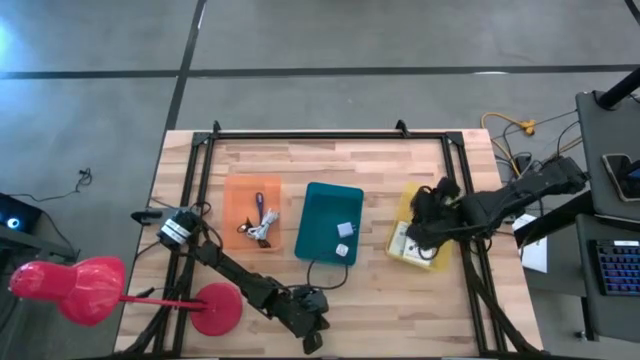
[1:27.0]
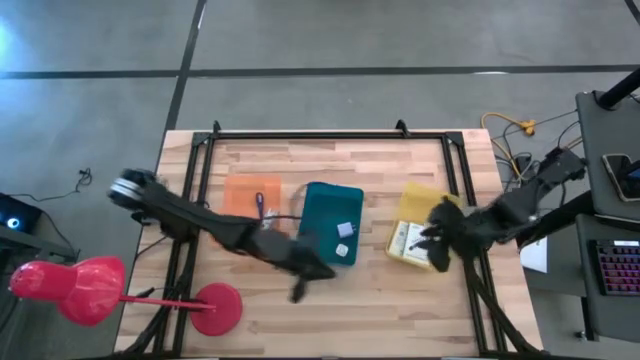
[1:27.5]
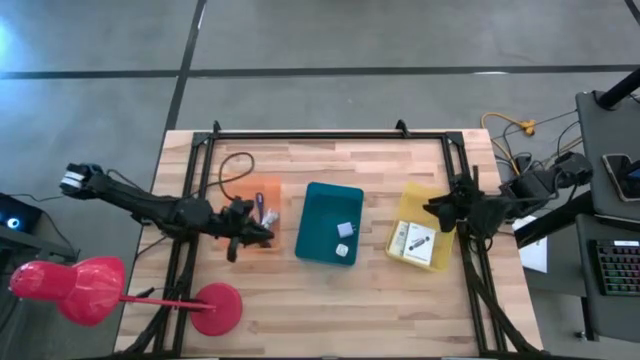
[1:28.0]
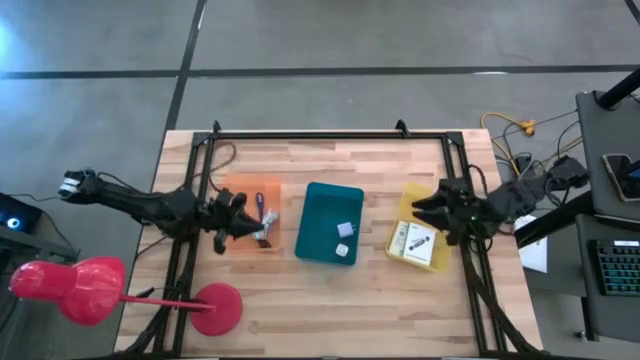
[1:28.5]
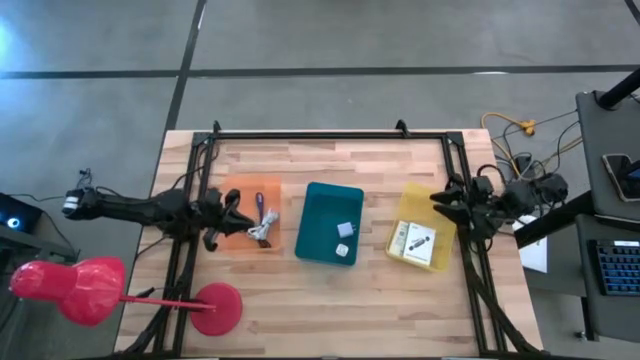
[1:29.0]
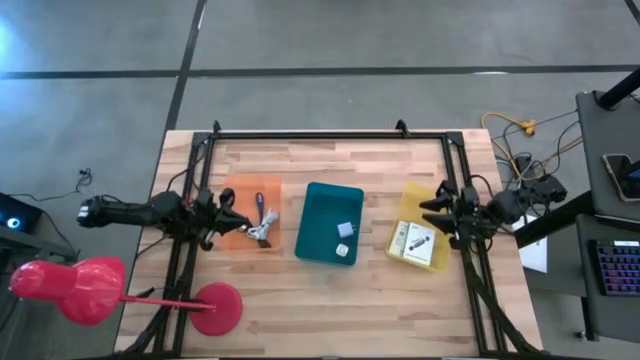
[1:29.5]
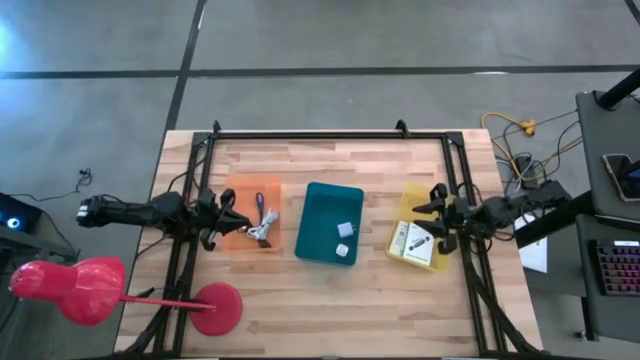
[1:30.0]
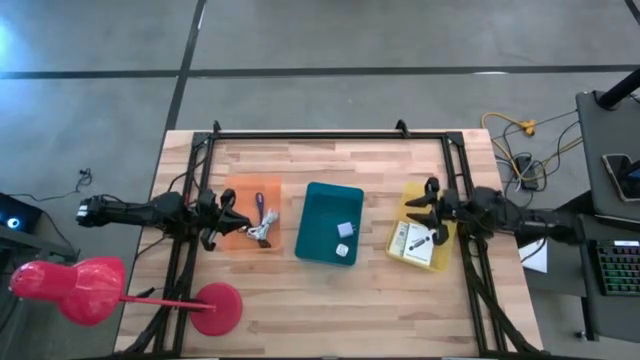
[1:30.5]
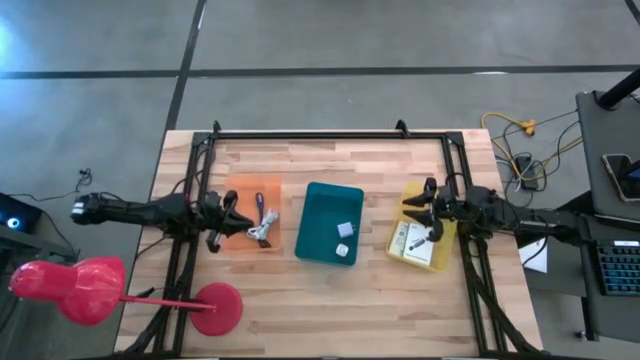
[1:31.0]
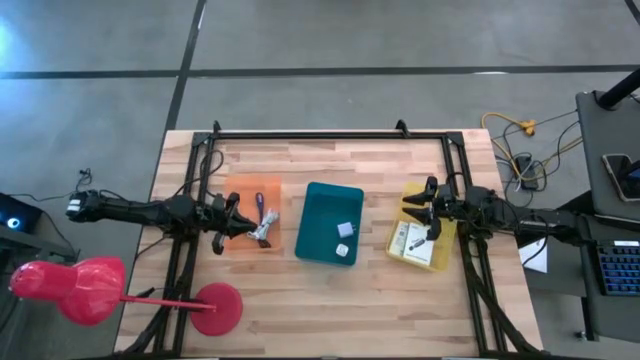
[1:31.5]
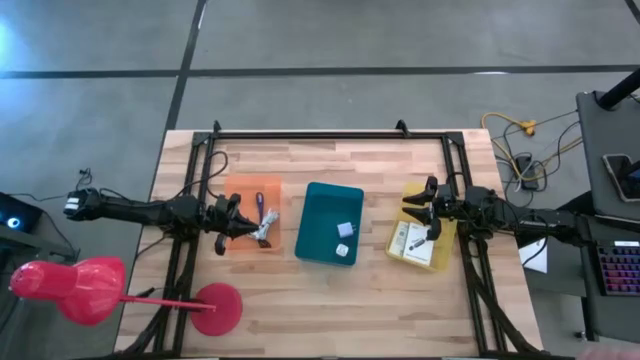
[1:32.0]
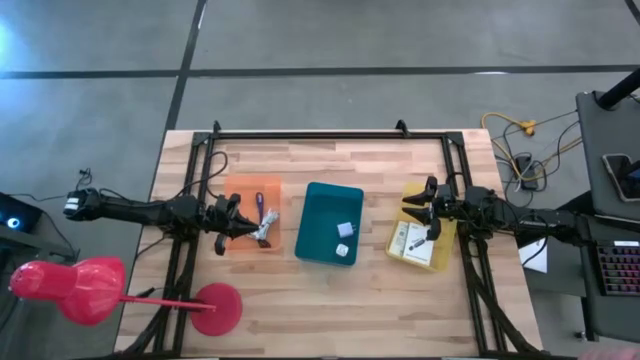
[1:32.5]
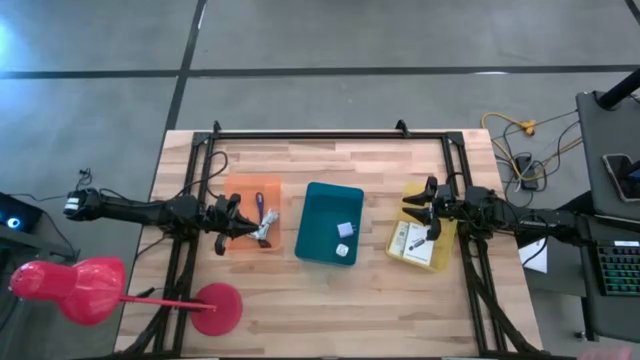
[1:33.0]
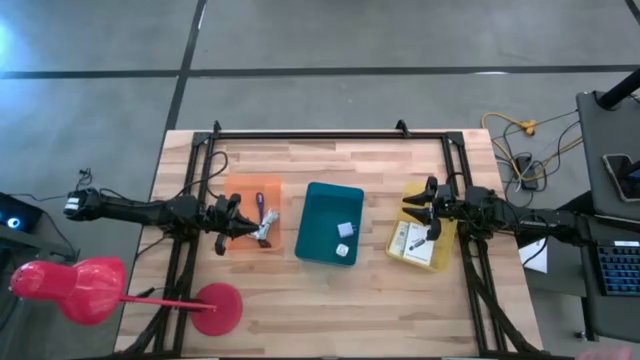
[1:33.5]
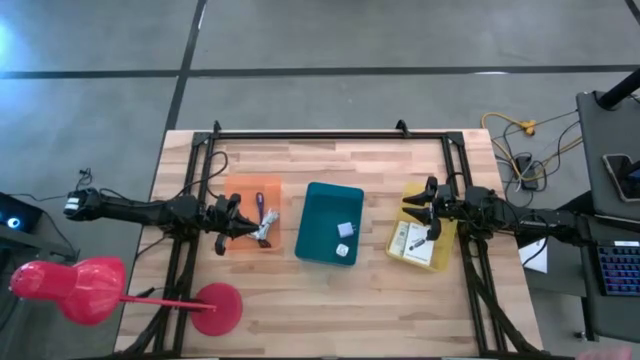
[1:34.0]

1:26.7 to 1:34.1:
Task: Pick and place items into bin
Return to Home Position

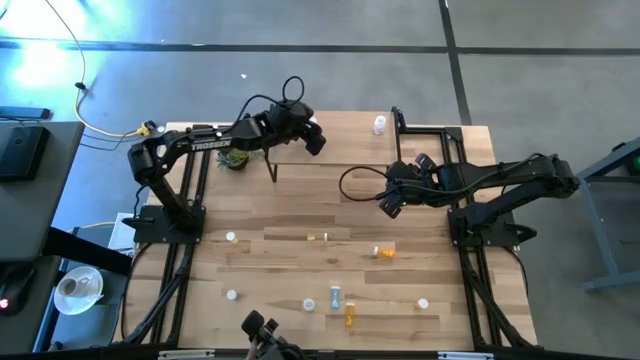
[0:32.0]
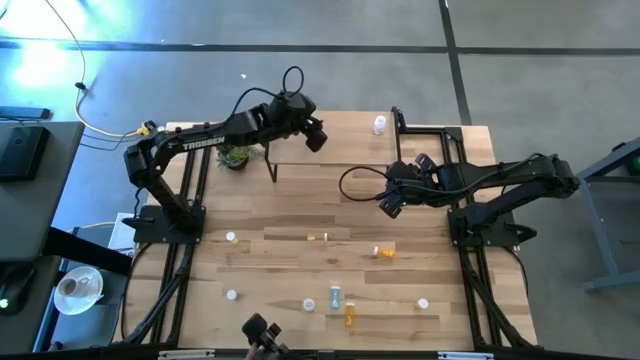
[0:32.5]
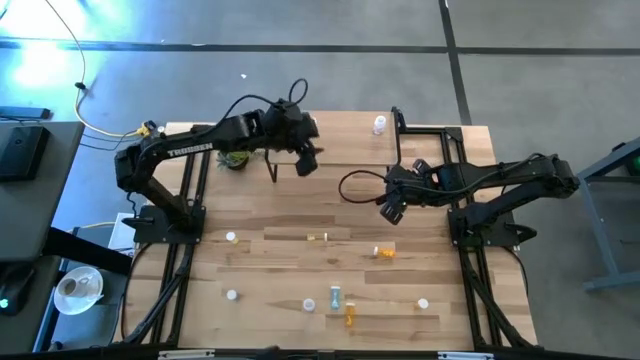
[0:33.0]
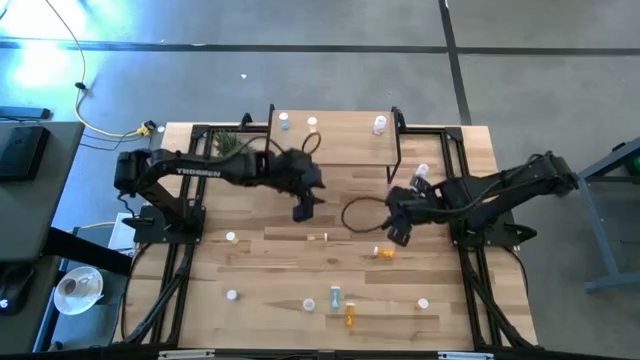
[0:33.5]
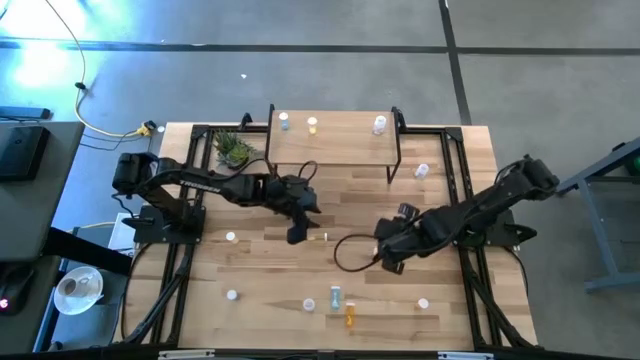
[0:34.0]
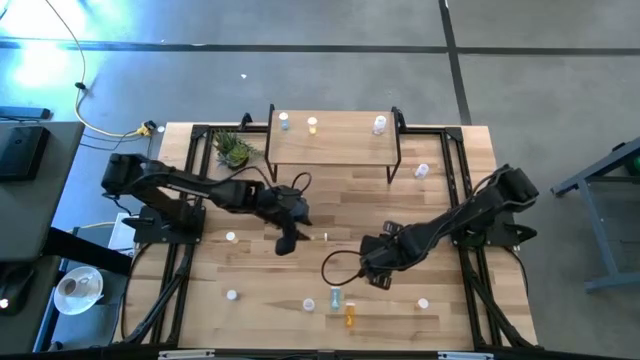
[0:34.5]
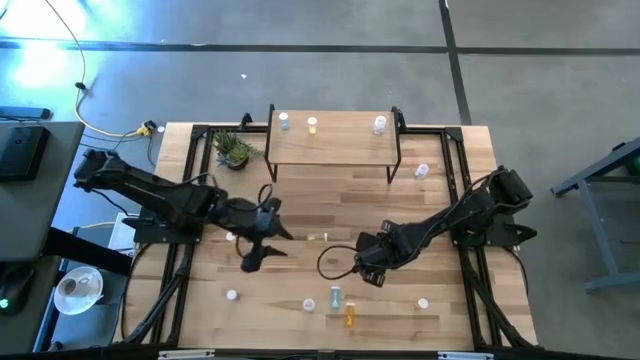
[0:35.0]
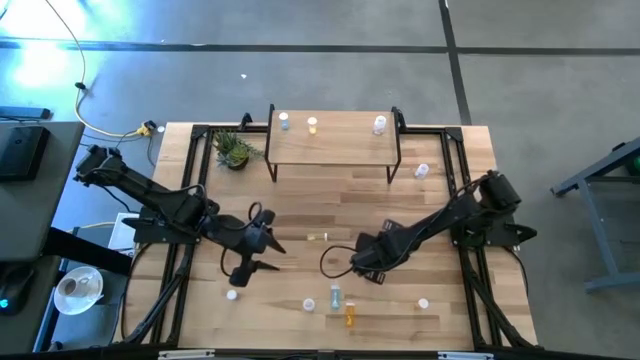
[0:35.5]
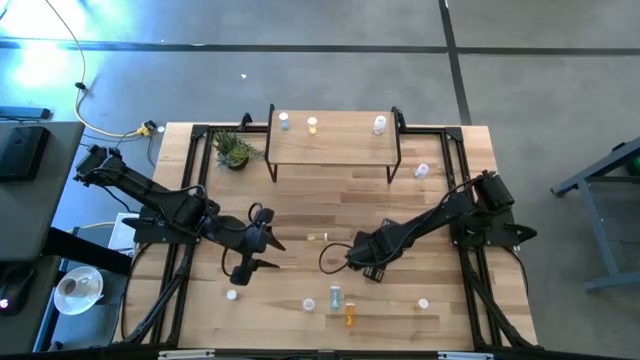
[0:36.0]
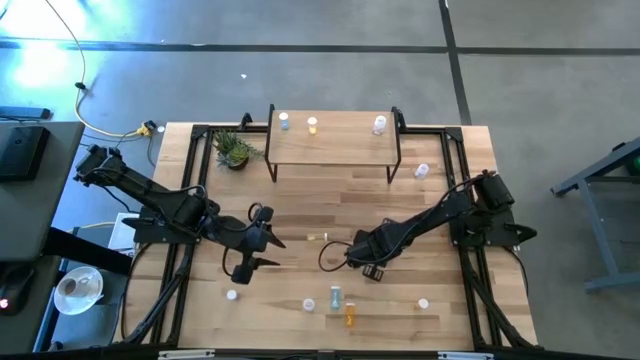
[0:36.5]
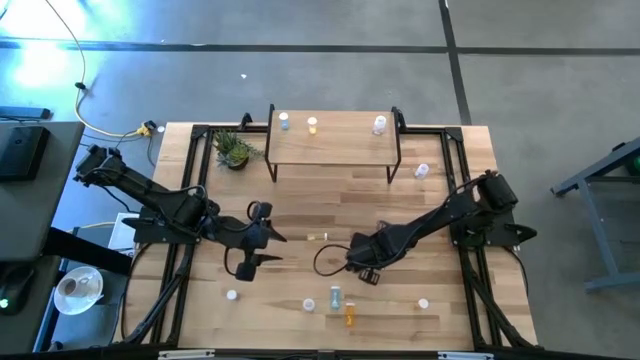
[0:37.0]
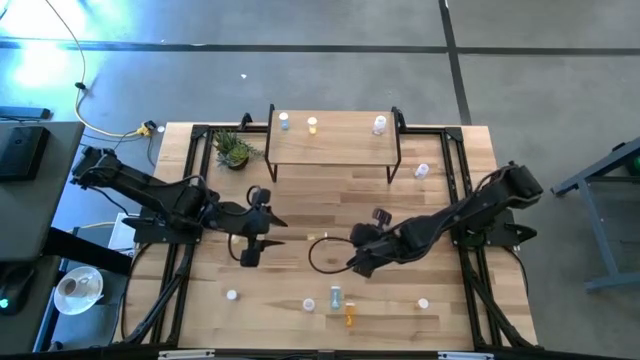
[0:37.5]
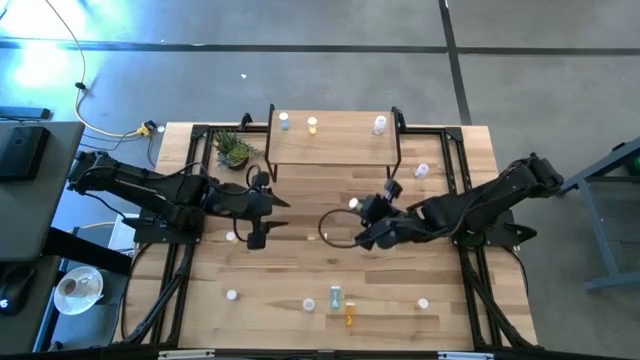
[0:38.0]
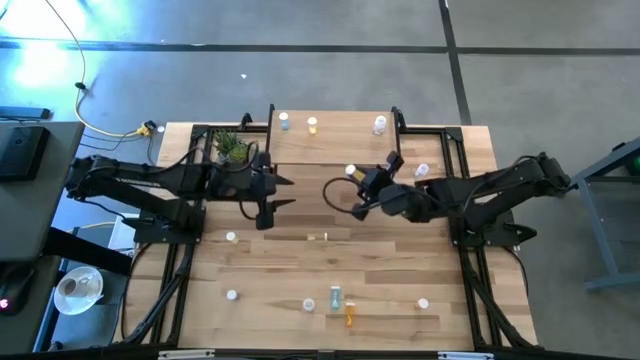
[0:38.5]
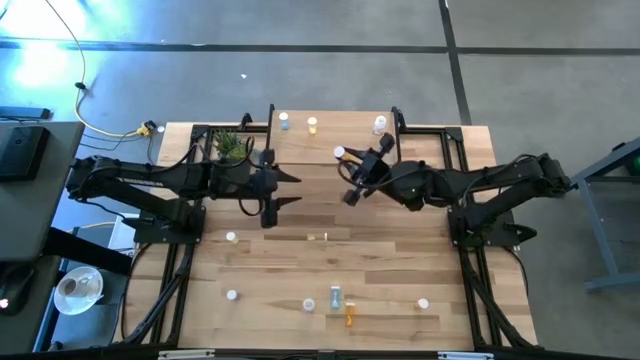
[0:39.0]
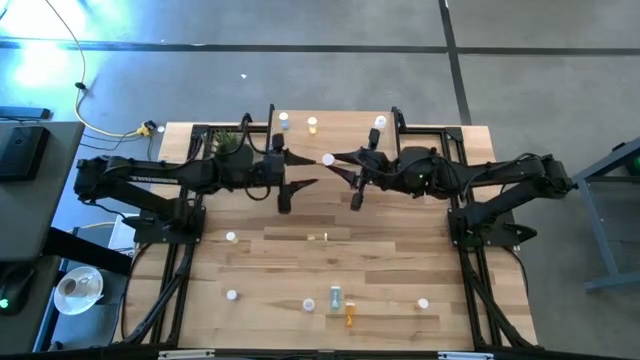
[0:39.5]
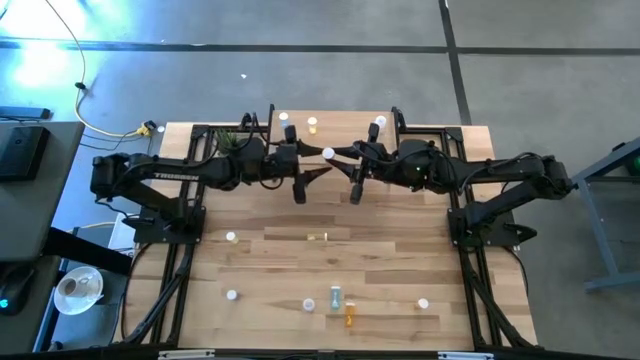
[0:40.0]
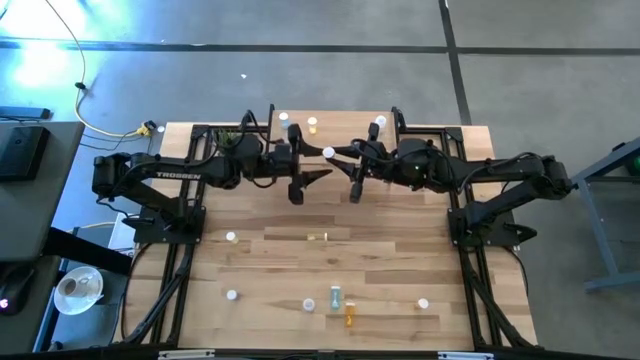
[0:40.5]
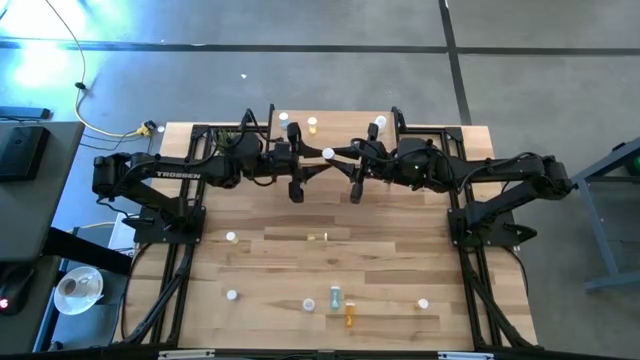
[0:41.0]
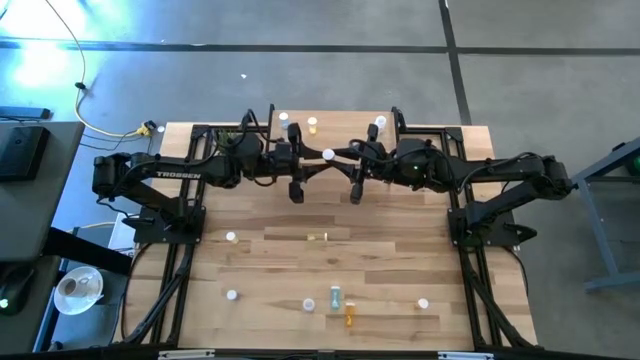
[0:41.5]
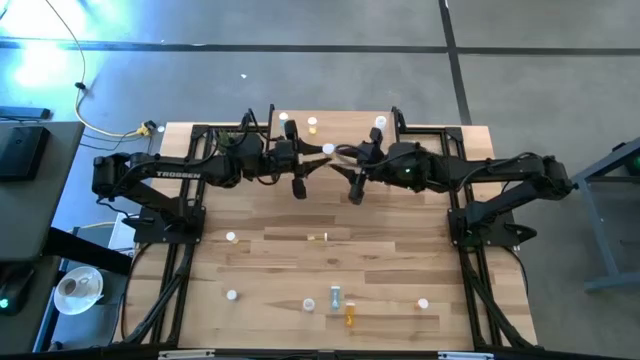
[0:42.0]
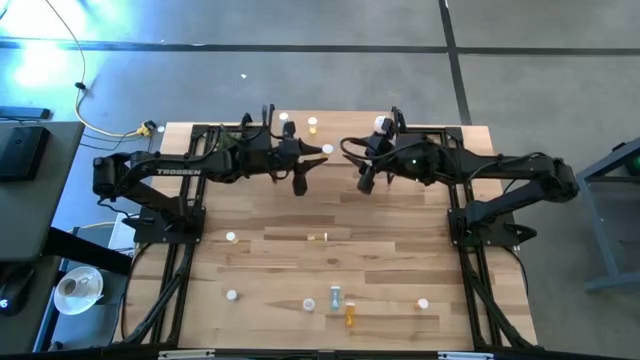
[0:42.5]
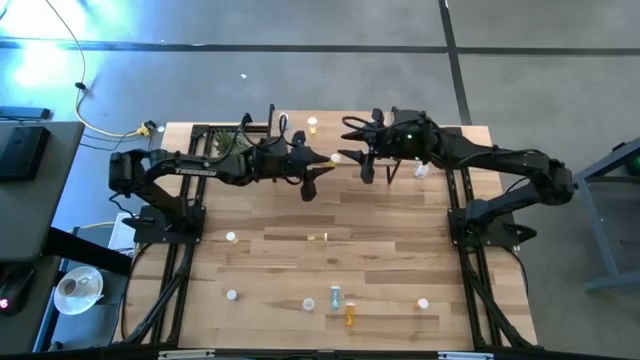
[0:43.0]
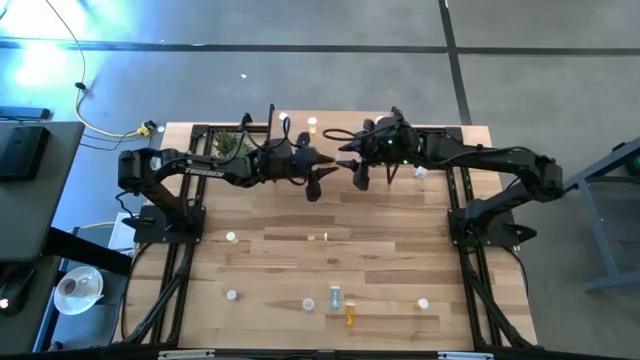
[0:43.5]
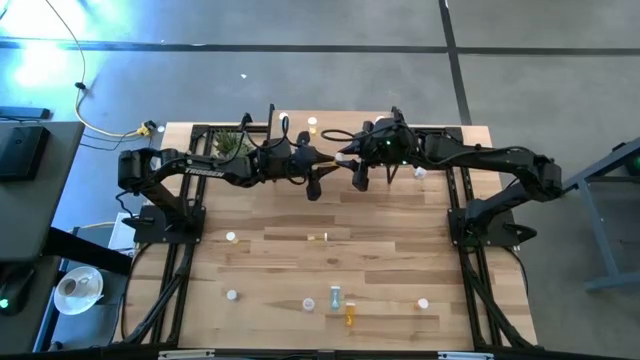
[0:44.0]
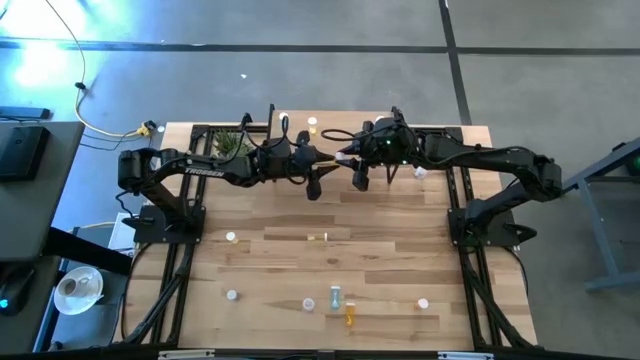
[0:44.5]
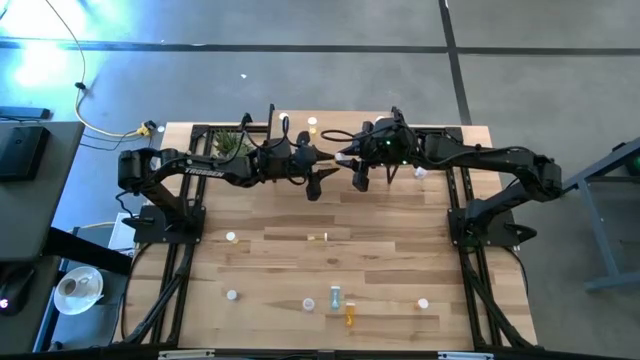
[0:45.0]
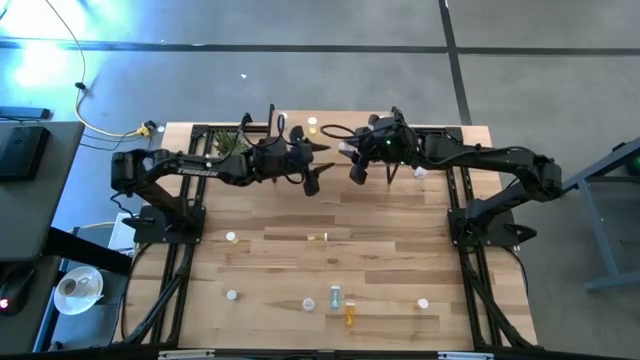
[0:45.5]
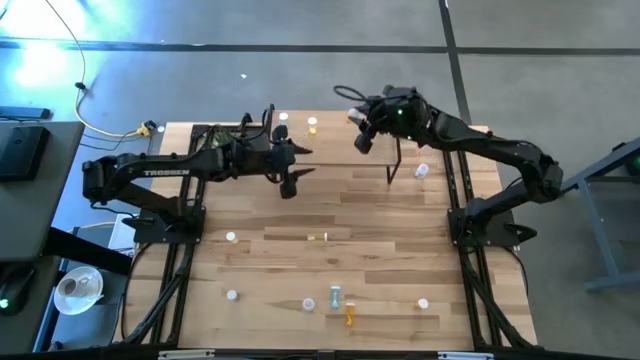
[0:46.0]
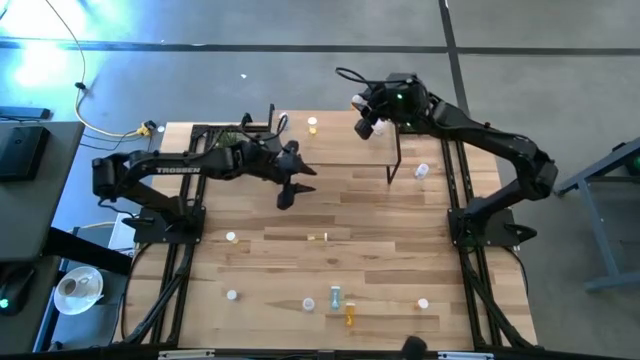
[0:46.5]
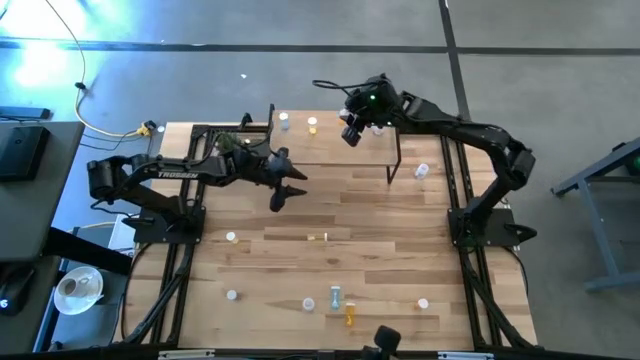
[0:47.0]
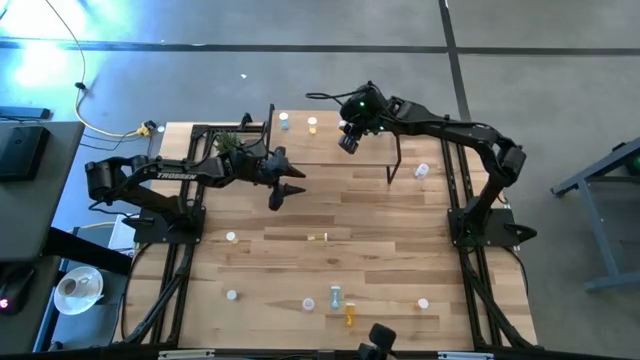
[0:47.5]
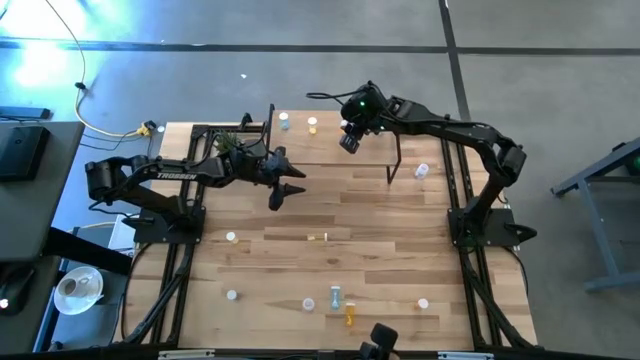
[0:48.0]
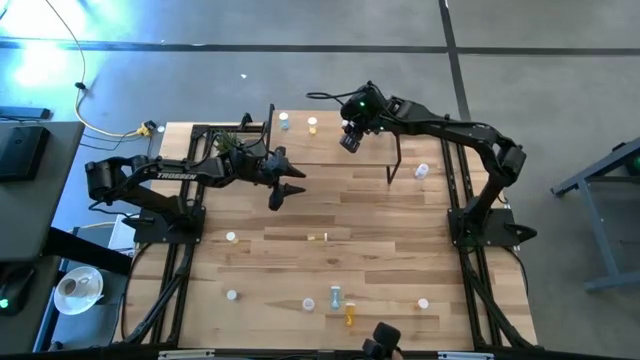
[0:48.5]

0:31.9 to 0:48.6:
Task: Pick and place medicine bottles onto shelf by color
Put the top orange pill bottle on the shelf
